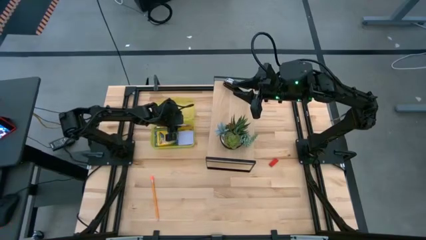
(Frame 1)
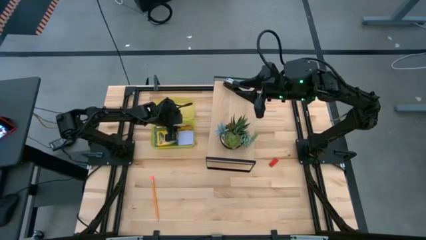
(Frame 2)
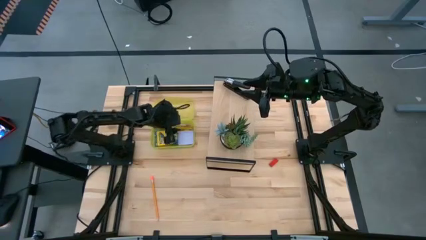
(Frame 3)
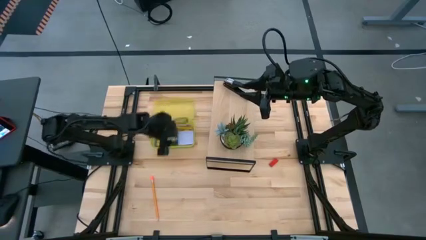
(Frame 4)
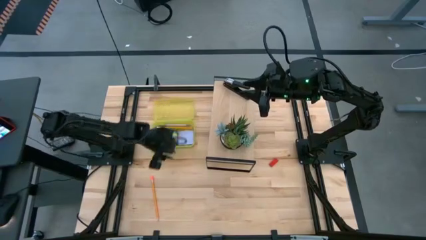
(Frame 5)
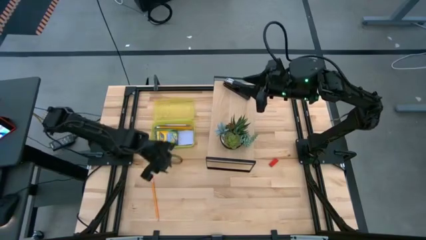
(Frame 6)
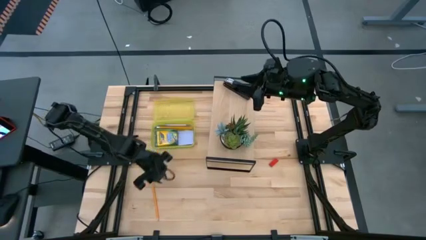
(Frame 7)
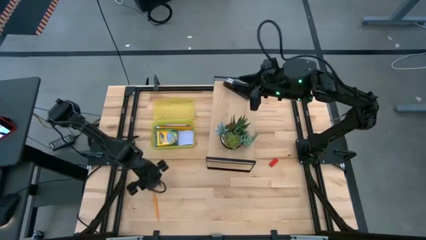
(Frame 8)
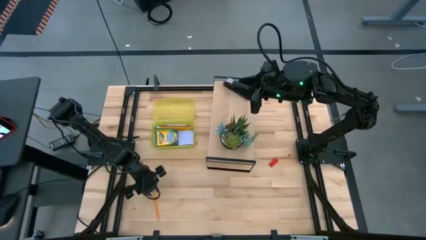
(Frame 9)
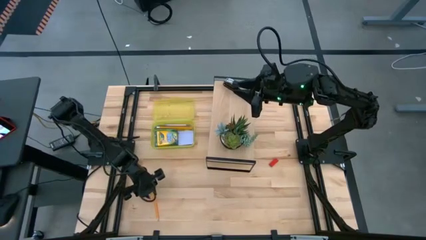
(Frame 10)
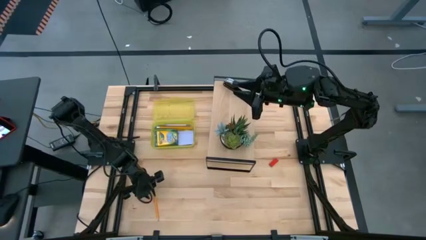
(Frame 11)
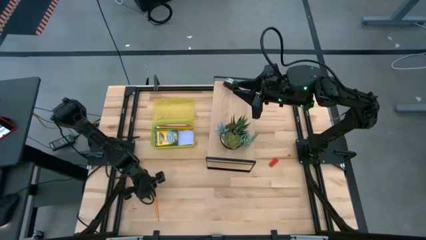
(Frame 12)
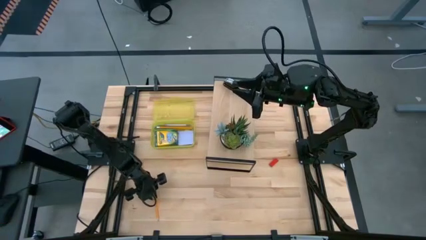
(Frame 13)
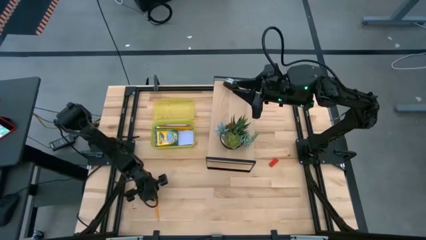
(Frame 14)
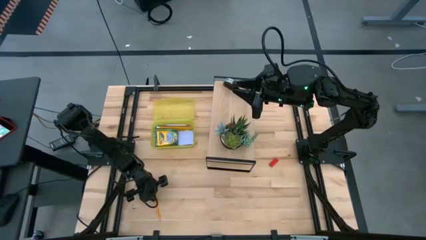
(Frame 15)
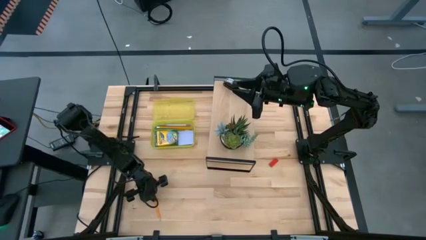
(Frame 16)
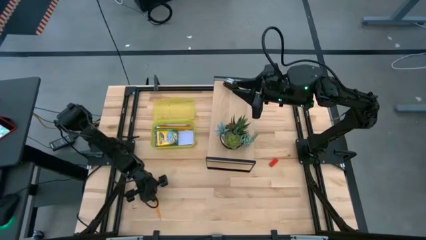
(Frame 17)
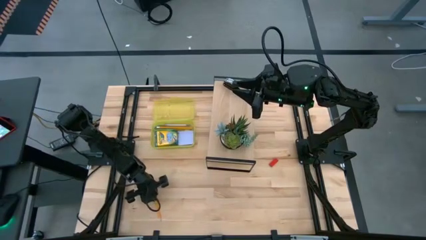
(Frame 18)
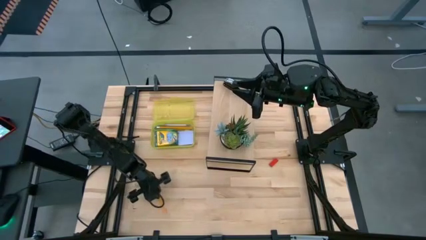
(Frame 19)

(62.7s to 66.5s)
Task: Pack school essentials
Put the orange pencil into the yellow supply box

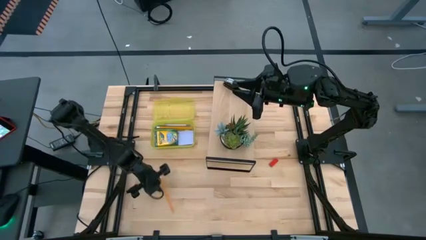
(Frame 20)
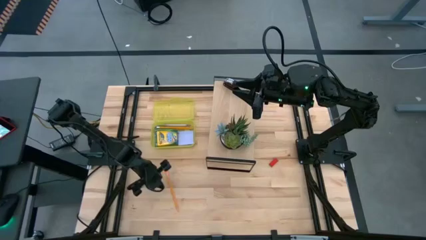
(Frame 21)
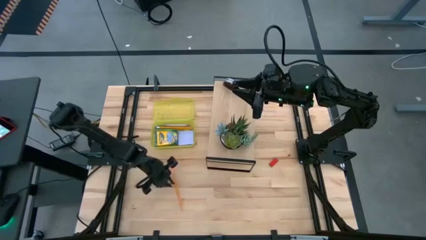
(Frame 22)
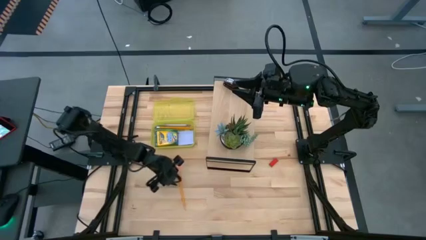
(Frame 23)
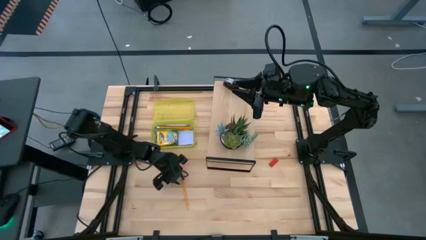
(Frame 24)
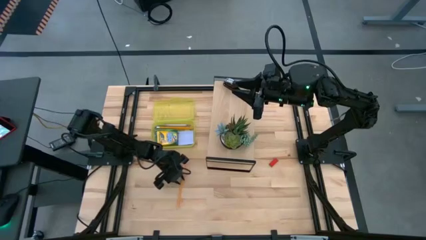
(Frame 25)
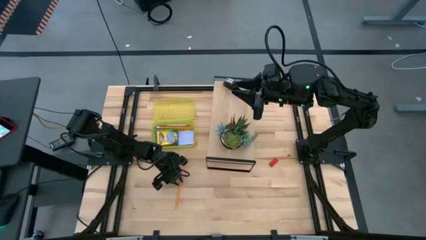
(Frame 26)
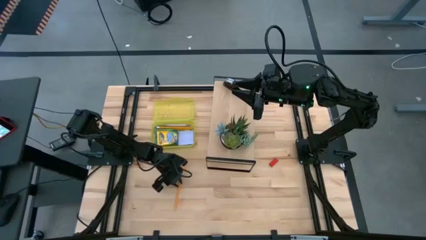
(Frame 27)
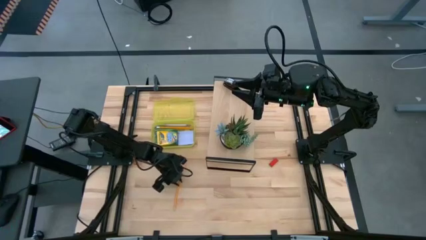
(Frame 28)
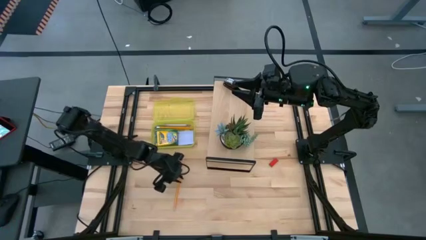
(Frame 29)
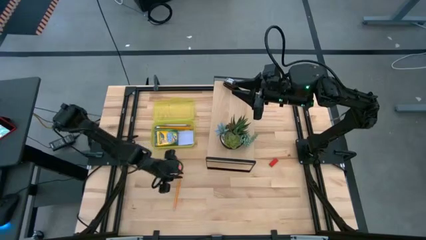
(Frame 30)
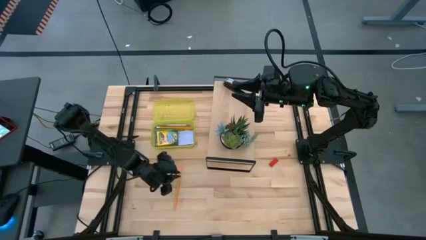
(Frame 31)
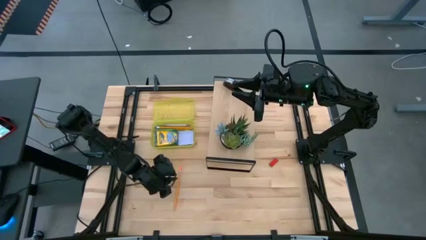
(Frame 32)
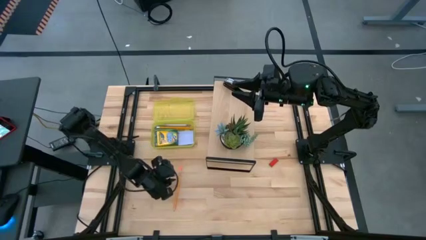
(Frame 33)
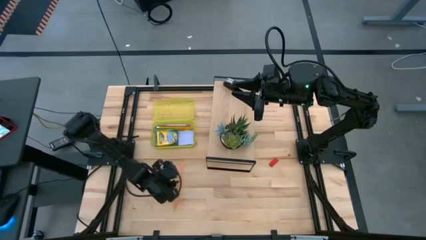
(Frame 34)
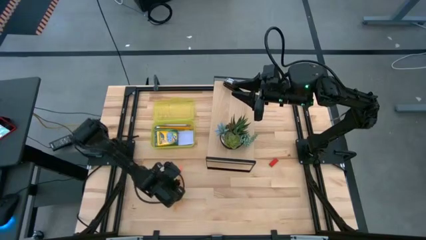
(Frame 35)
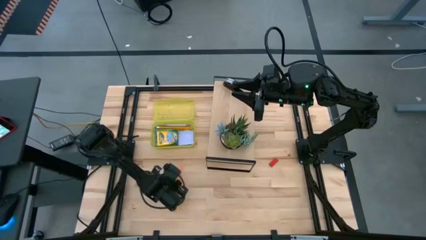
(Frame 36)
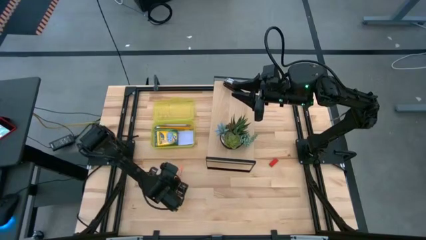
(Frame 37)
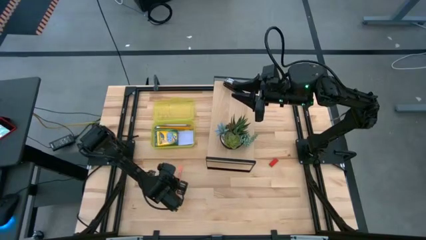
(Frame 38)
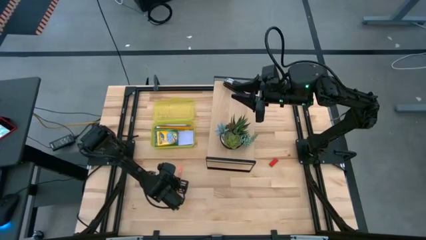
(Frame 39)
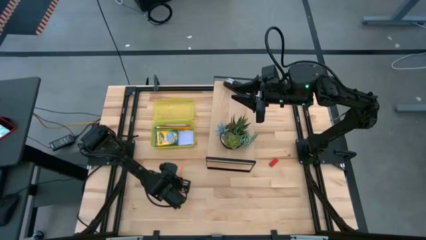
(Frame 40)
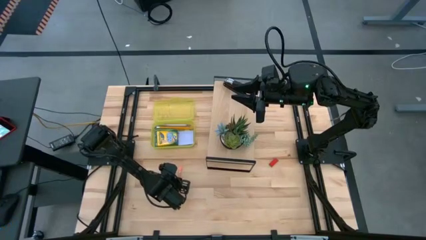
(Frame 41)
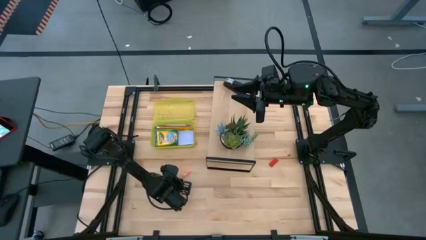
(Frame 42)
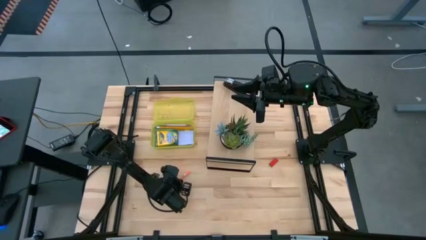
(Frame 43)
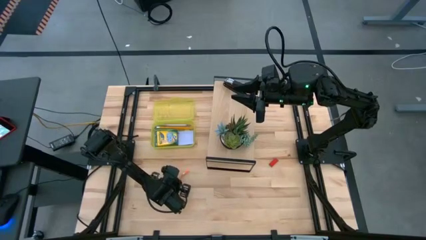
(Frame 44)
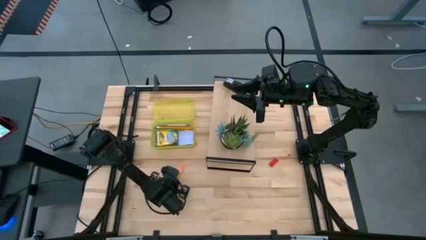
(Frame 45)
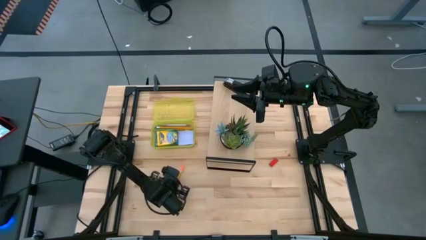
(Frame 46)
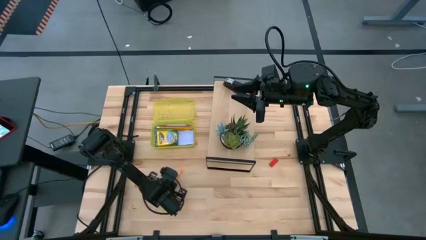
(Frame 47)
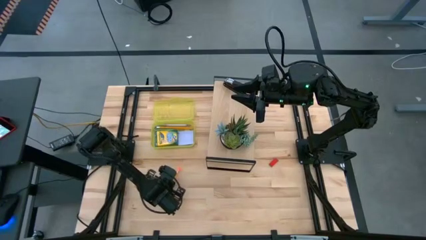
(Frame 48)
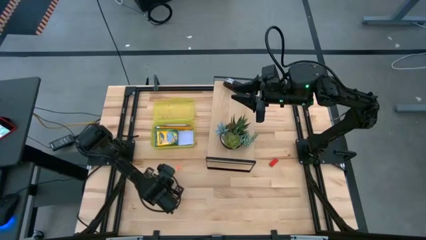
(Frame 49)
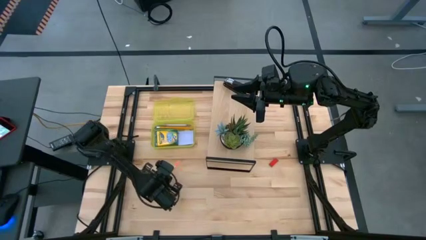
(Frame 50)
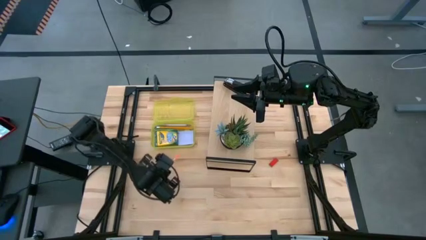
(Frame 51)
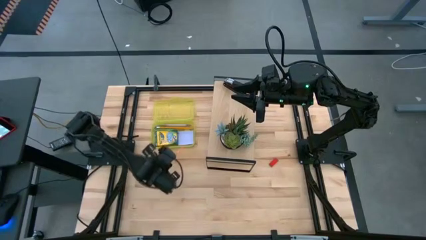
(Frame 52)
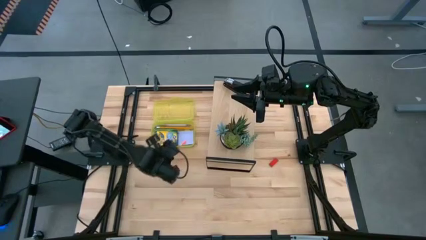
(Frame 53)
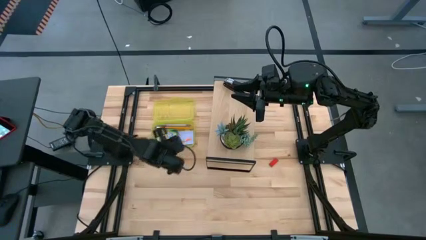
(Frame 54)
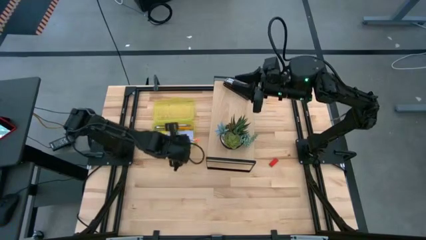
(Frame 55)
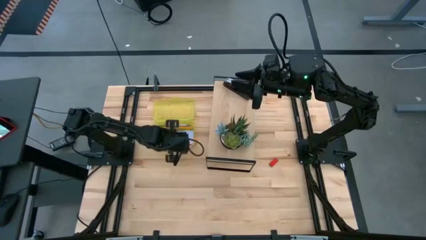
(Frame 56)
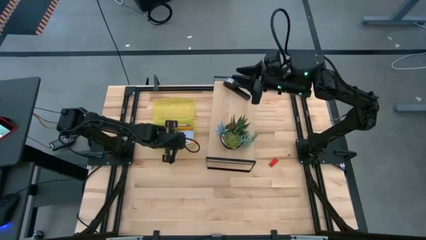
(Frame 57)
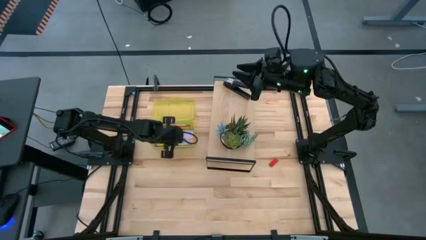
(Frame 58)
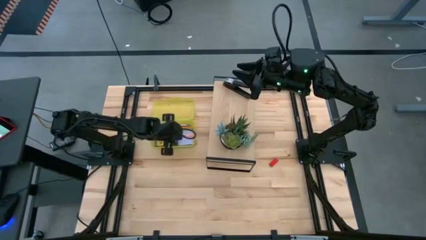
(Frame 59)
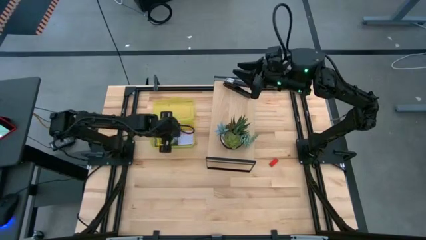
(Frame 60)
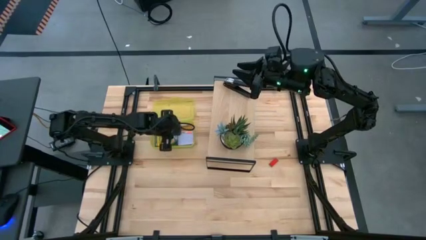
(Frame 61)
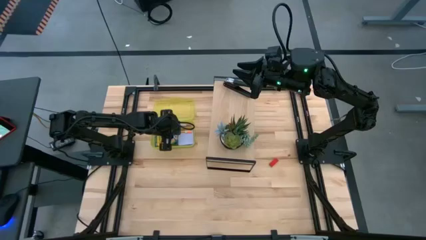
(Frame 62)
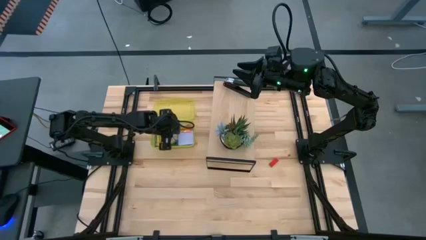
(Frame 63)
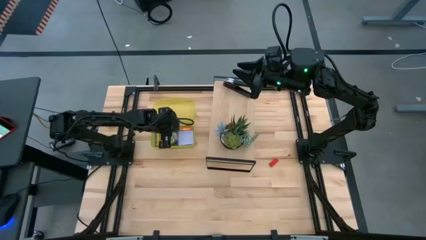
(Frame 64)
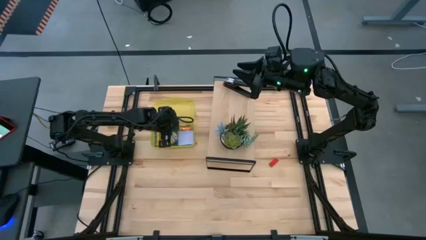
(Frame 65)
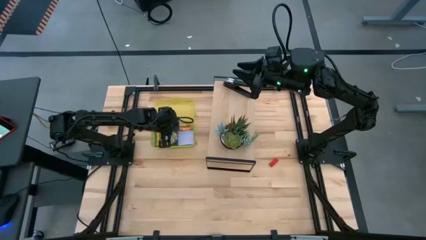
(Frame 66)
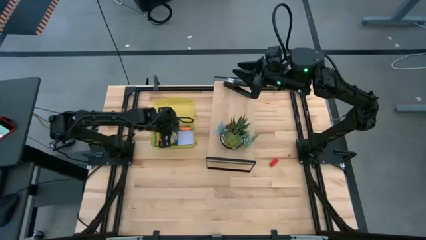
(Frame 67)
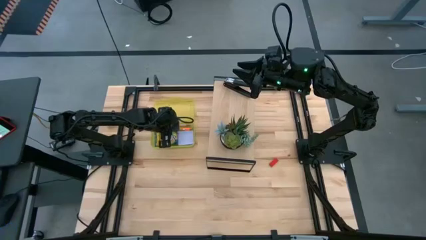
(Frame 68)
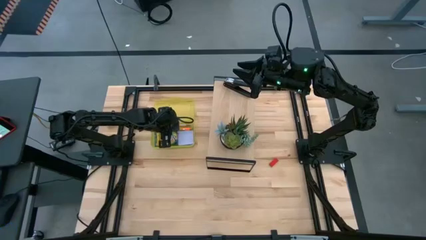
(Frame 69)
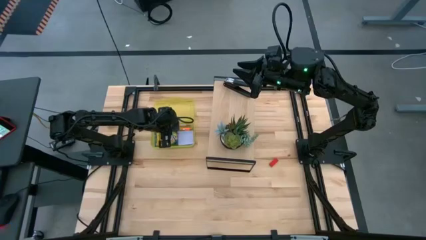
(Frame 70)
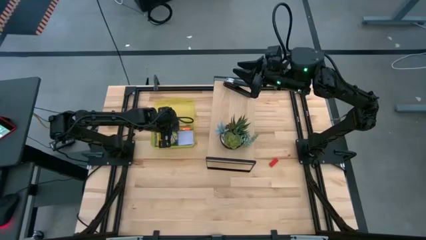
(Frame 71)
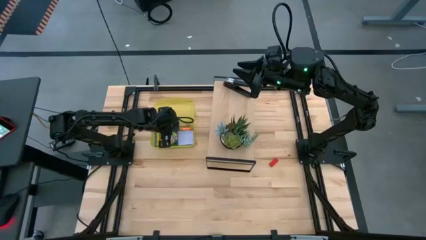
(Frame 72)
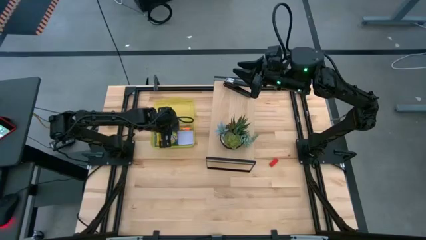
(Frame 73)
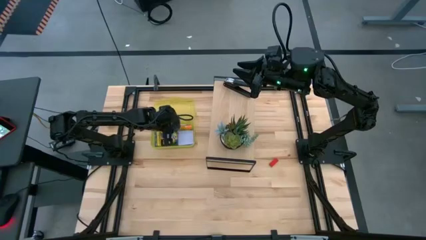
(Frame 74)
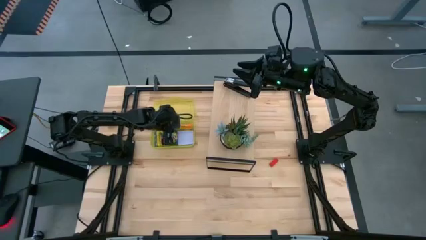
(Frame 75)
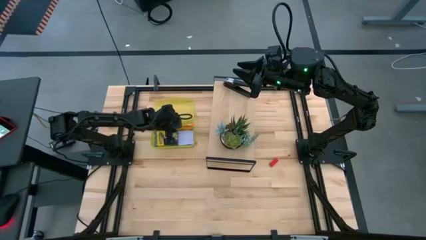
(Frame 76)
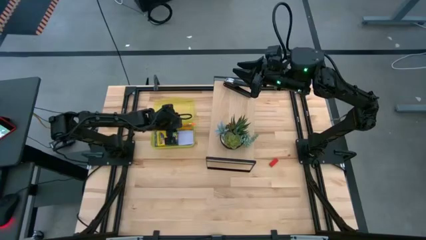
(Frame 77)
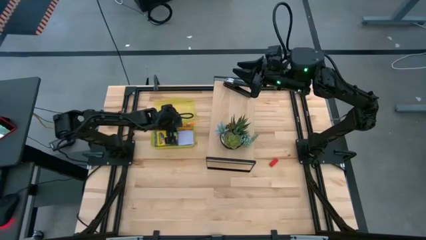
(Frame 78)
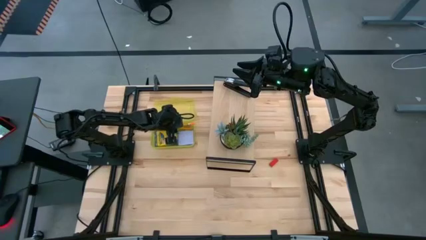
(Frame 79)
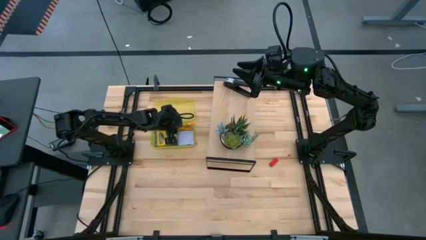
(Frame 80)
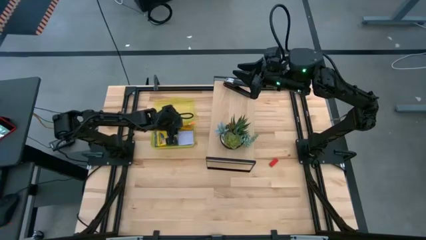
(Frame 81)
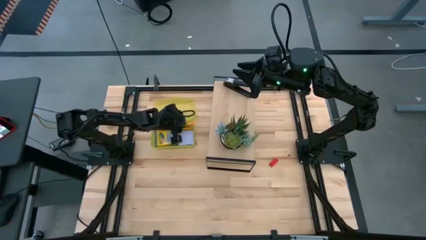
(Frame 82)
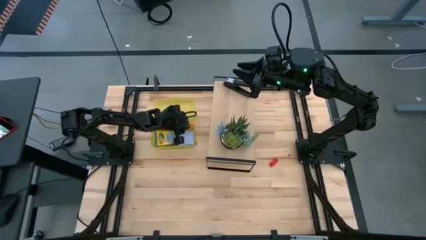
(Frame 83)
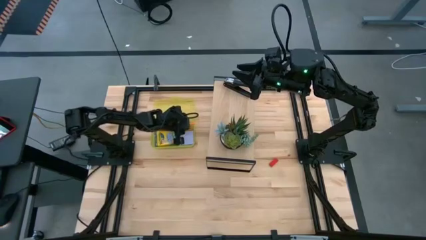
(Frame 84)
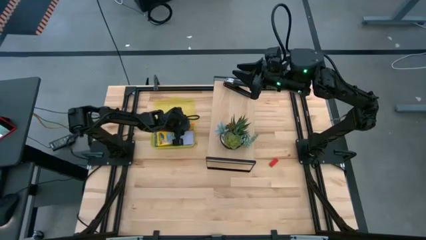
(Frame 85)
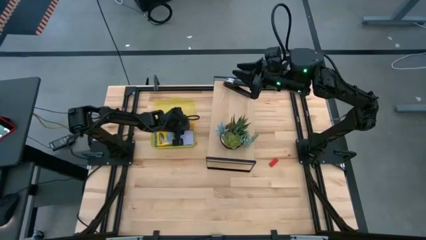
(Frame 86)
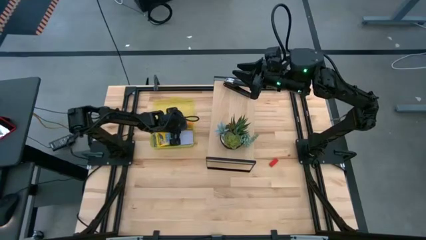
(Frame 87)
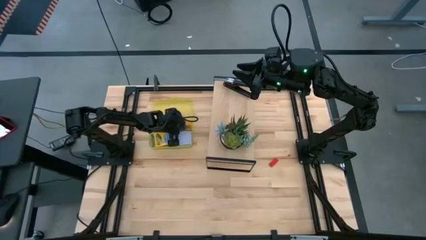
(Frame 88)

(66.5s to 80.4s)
Put the orange pencil into the yellow supply box
